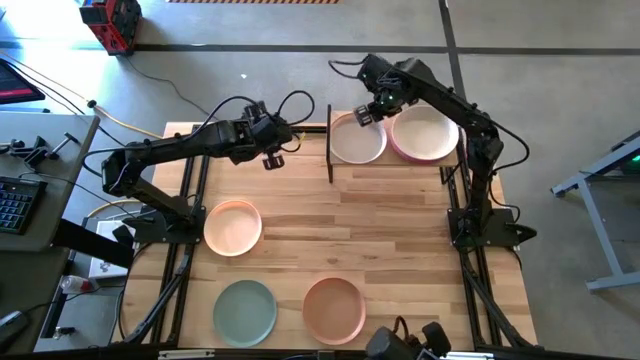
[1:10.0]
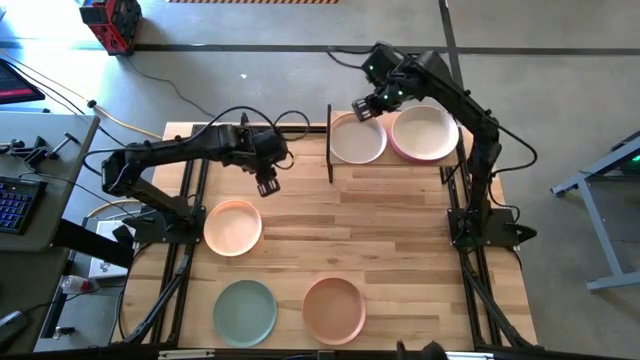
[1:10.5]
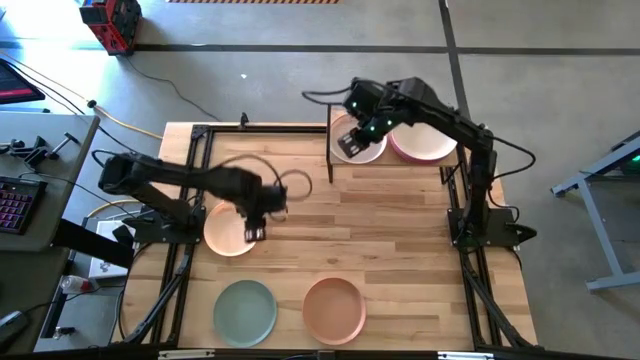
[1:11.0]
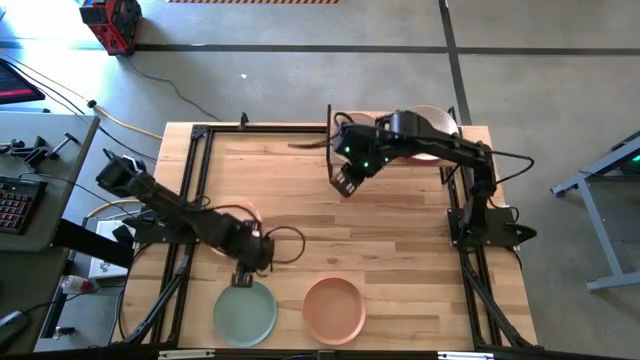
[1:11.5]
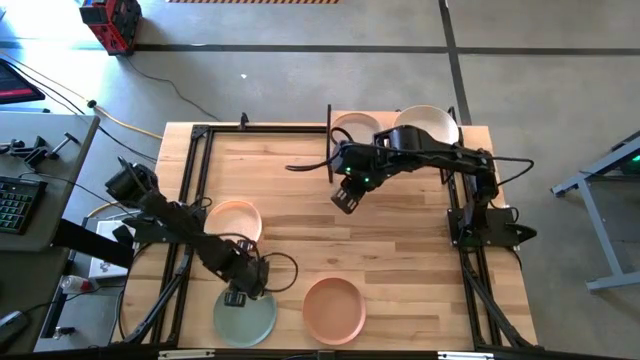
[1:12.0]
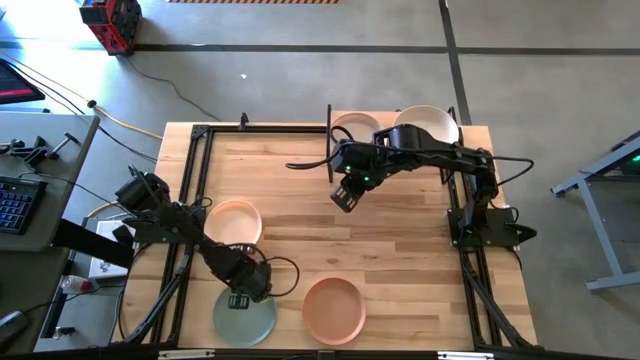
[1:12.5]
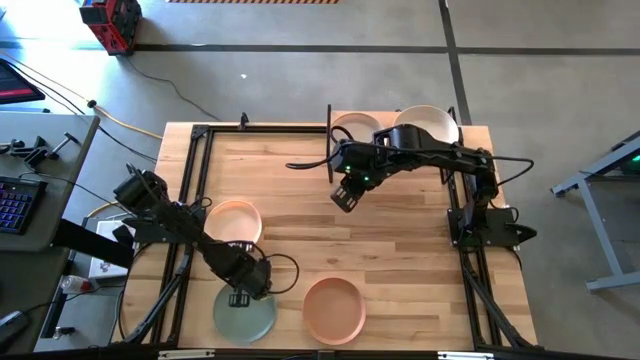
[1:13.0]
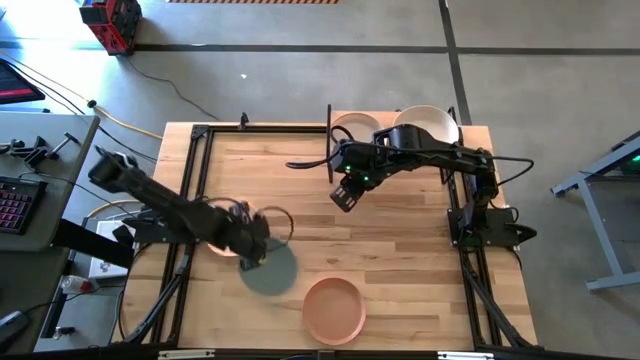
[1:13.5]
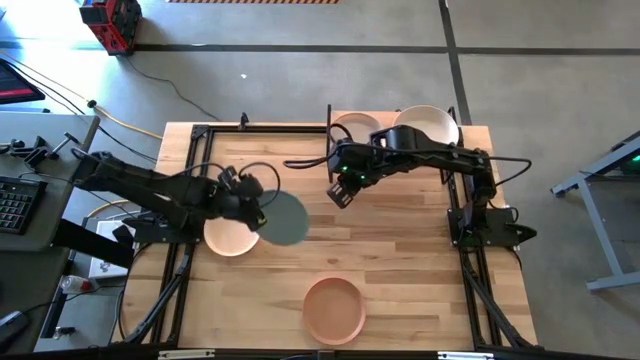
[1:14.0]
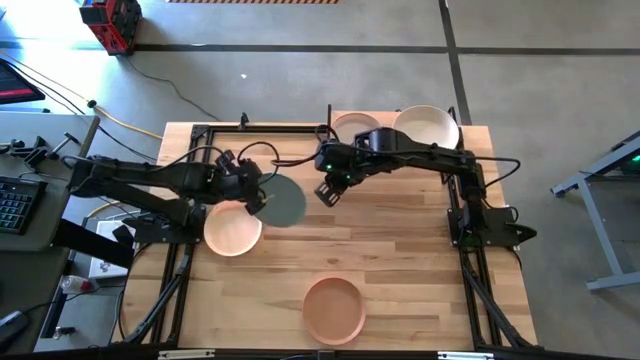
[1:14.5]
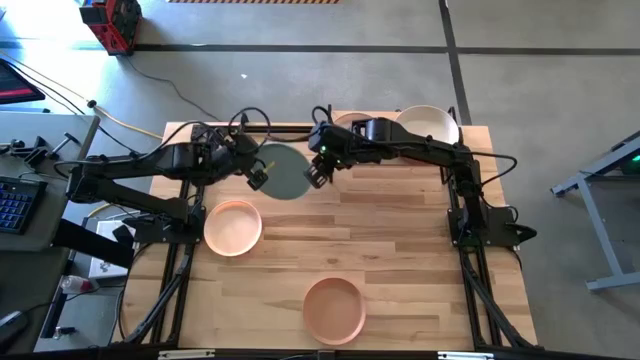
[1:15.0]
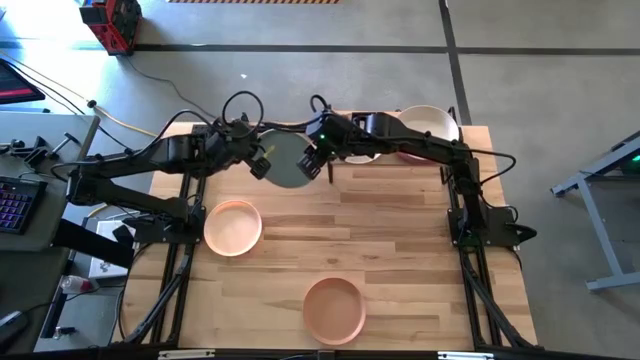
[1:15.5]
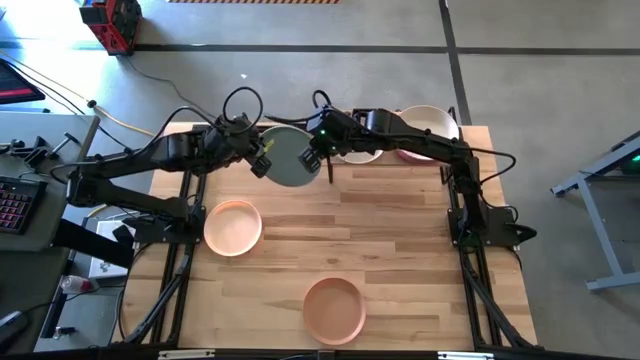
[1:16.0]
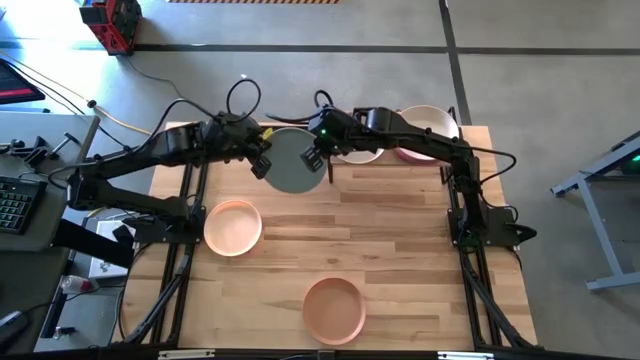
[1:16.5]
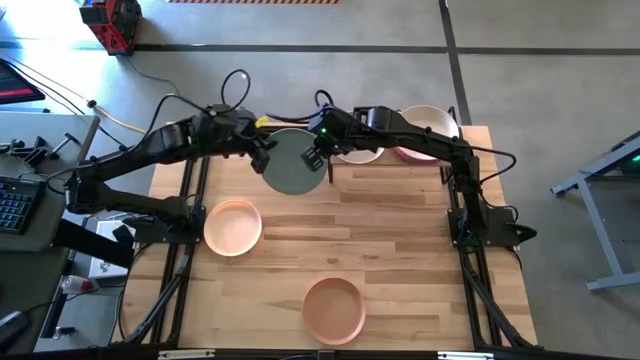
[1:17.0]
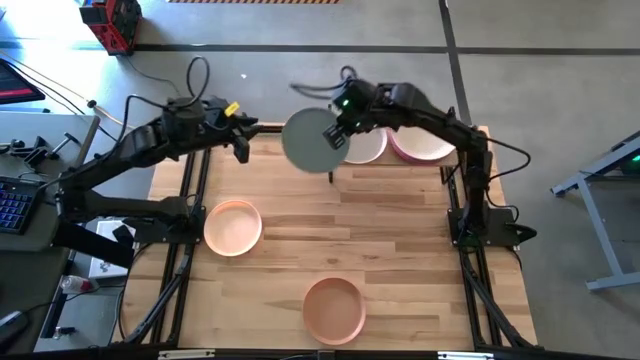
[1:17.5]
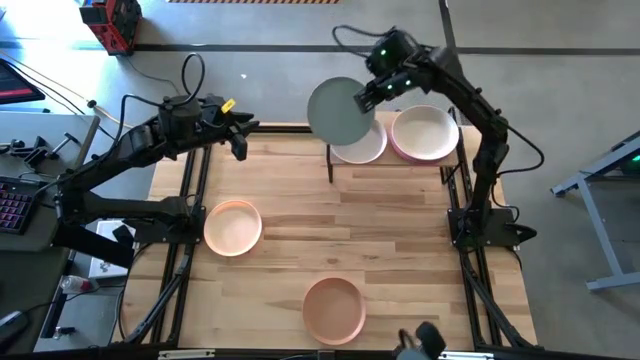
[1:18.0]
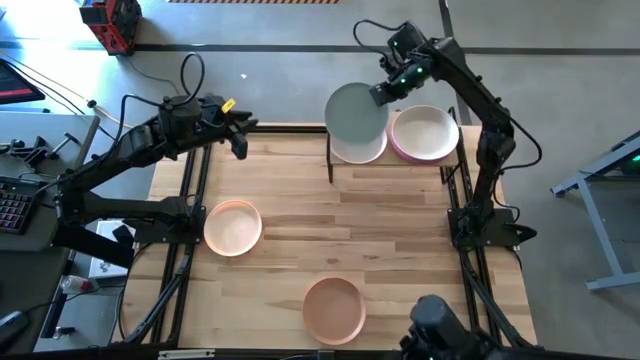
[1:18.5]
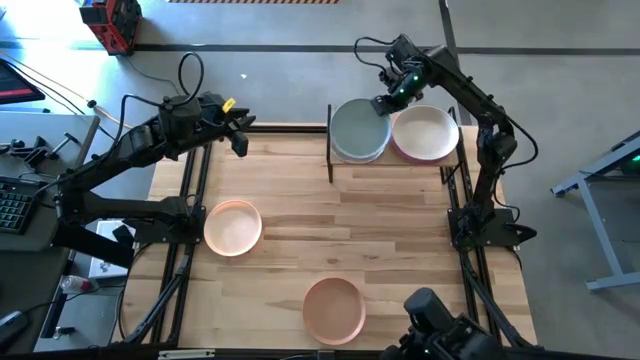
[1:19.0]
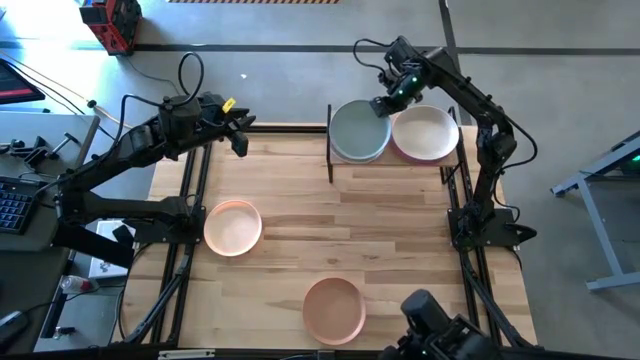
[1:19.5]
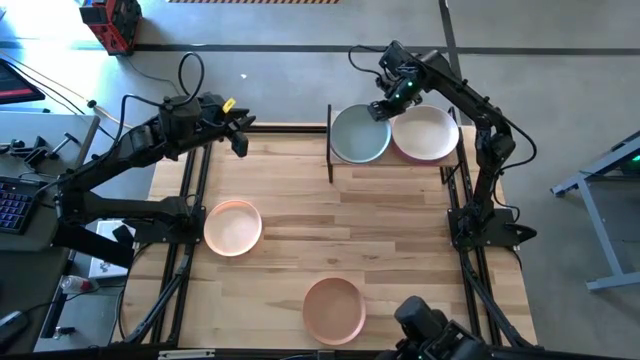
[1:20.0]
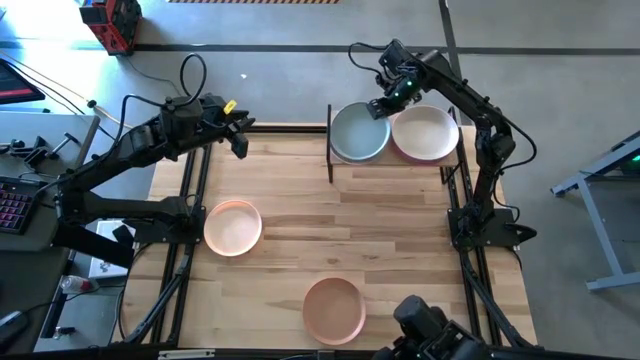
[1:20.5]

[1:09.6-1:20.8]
Task: Place and stack plates onto a shelf
Stack the light blue plate on top of the left white plate on the shelf

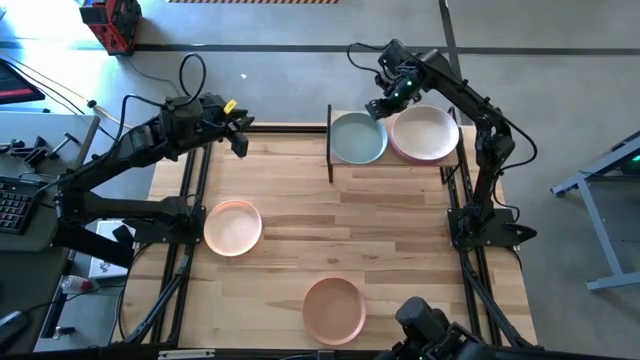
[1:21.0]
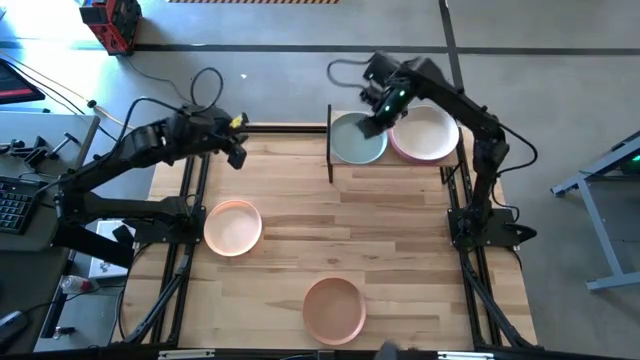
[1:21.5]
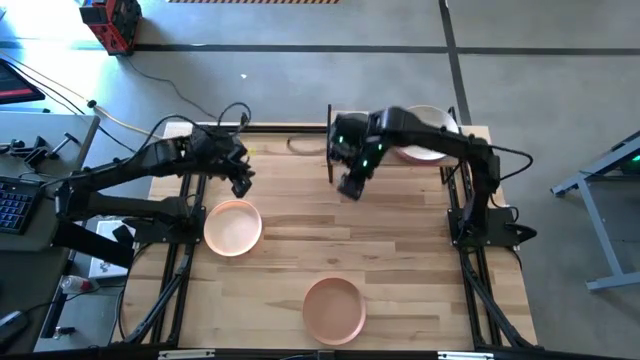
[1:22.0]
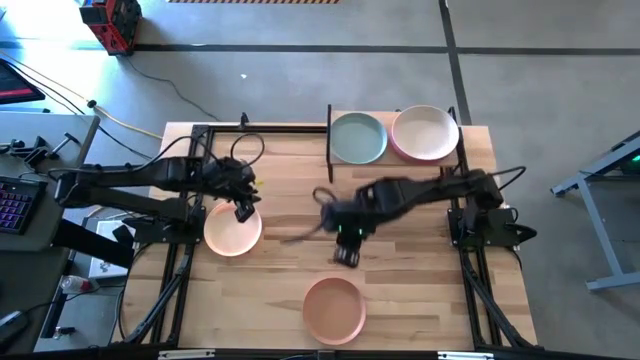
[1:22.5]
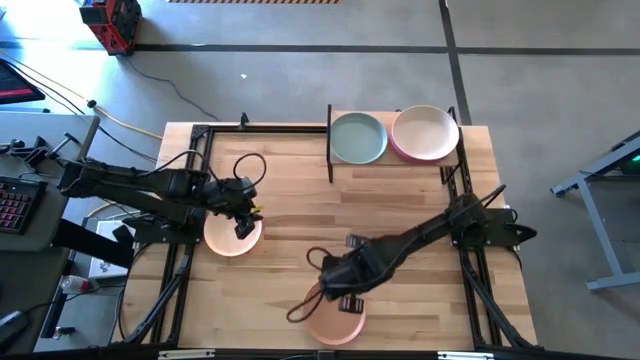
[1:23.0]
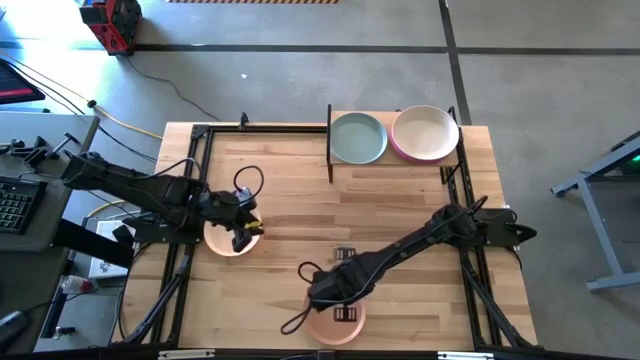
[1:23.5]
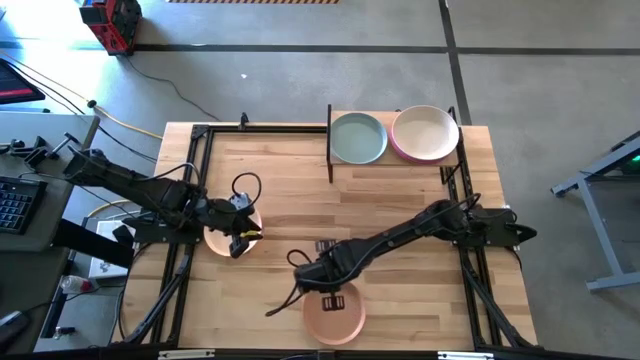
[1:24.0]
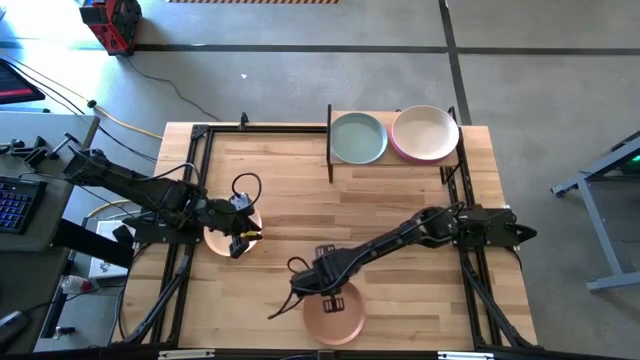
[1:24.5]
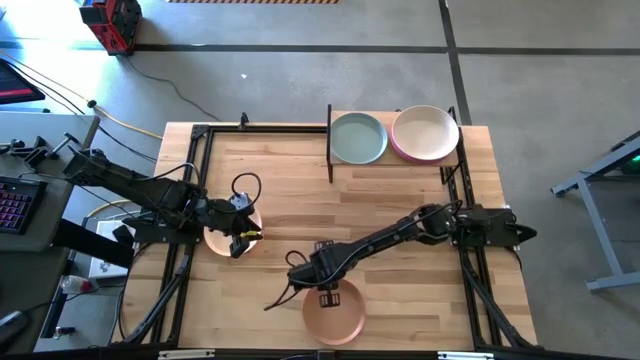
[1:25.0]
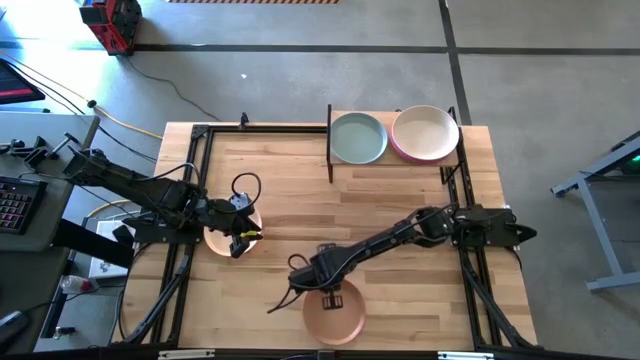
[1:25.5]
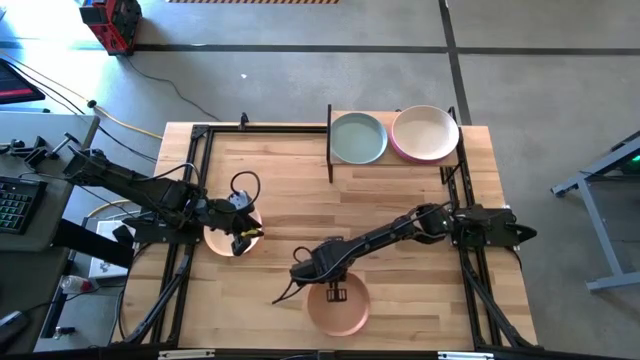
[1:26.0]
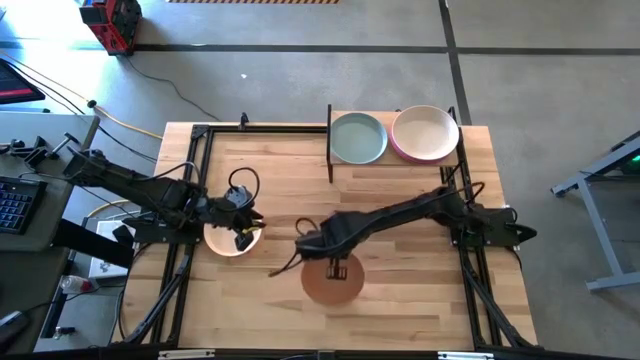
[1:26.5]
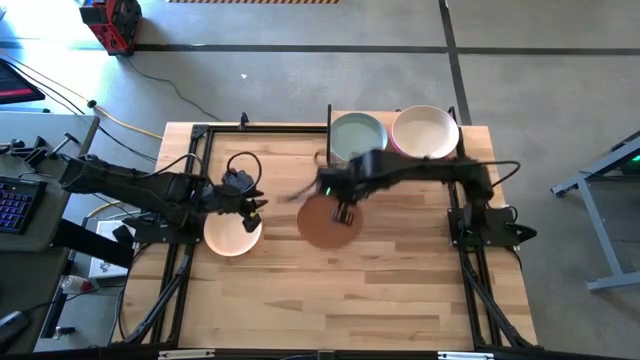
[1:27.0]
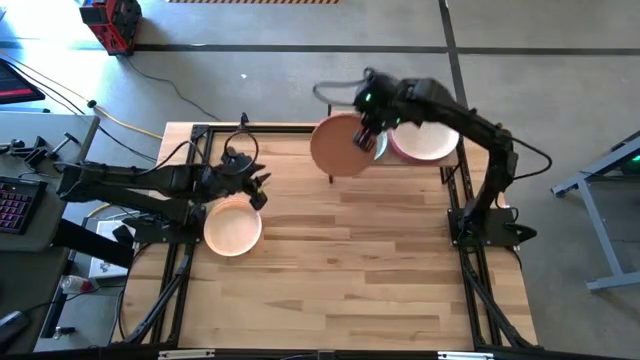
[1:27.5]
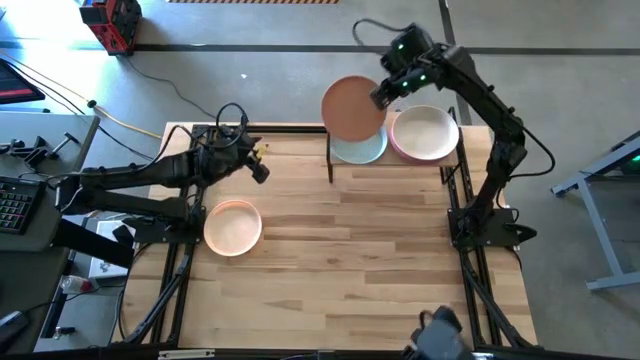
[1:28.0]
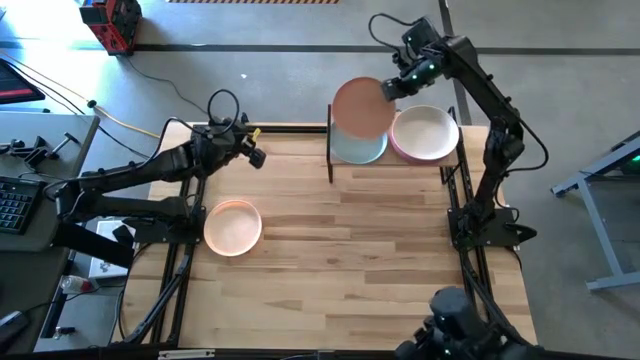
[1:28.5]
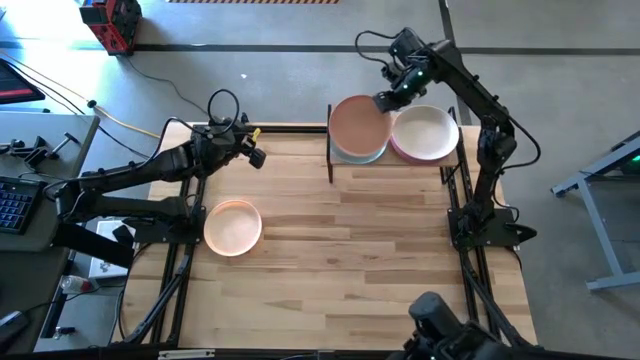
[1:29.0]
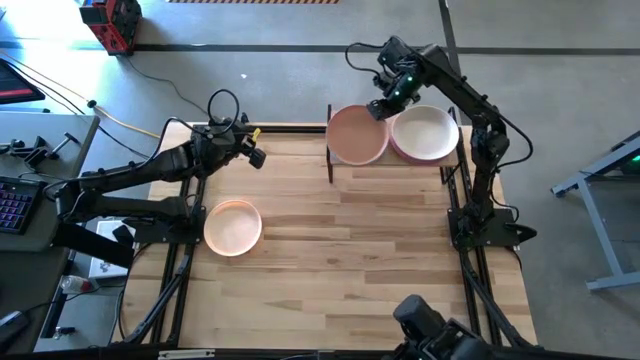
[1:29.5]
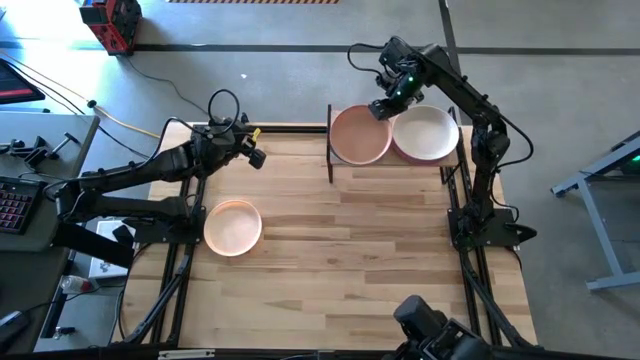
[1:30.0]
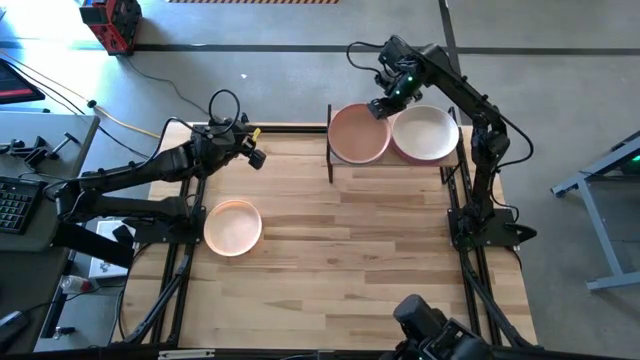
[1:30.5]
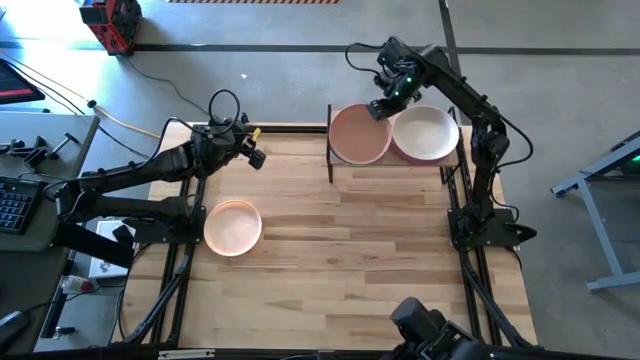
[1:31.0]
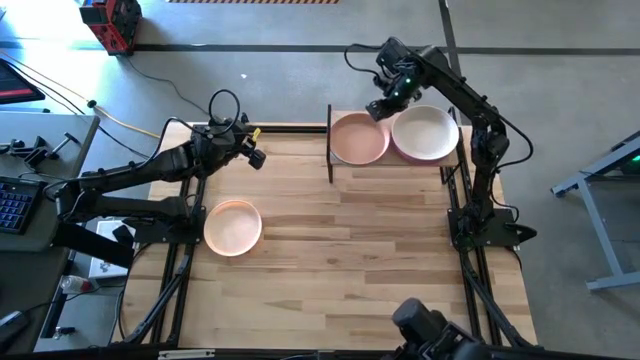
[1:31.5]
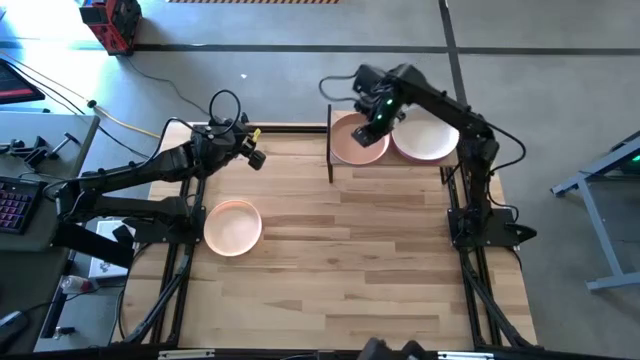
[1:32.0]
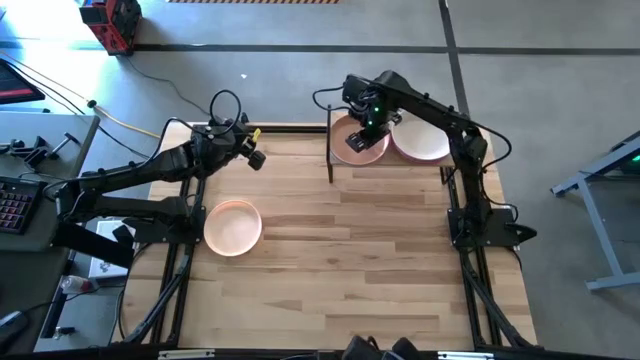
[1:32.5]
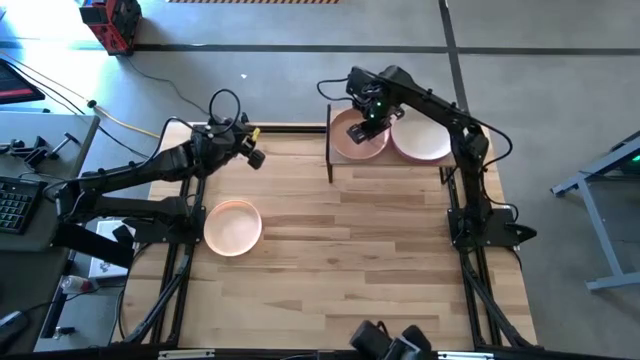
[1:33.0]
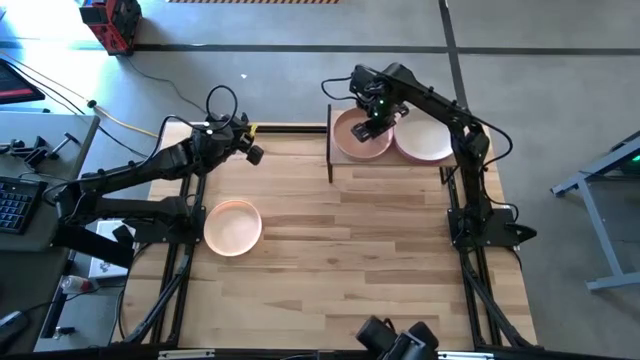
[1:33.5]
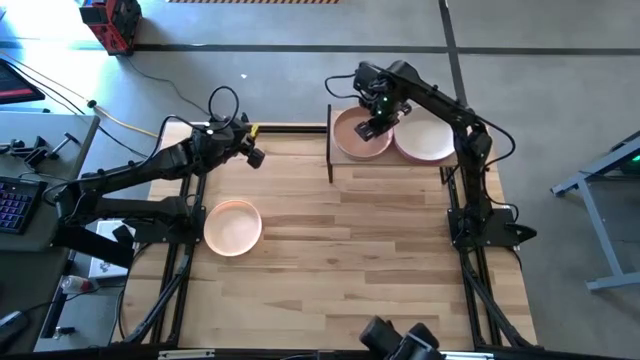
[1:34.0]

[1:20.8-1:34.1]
Stack the brown plate on top of the light blue plate on the shelf
